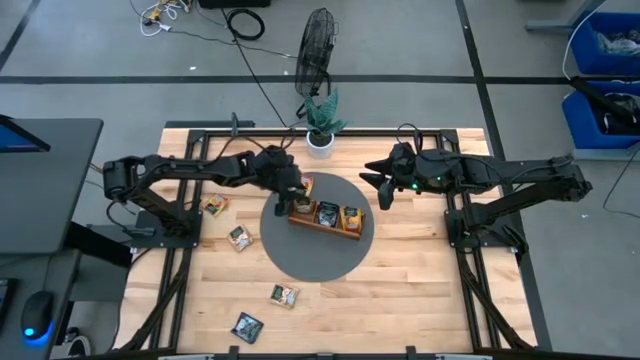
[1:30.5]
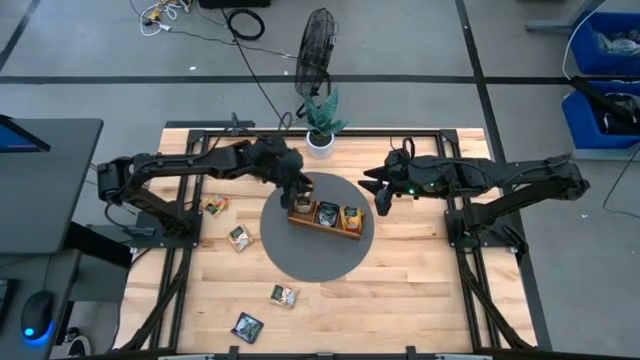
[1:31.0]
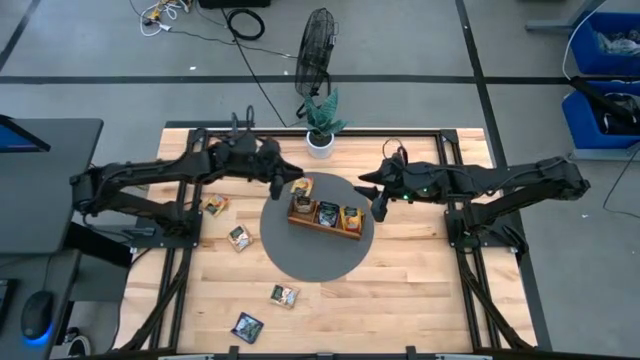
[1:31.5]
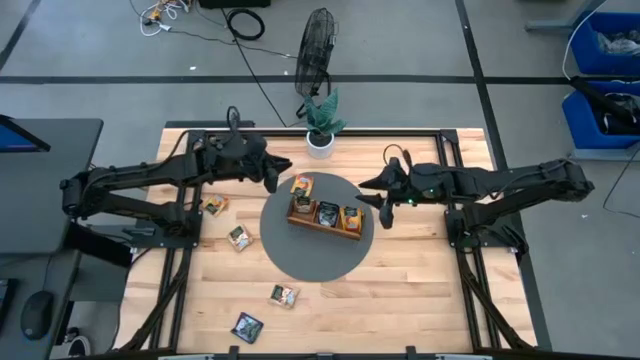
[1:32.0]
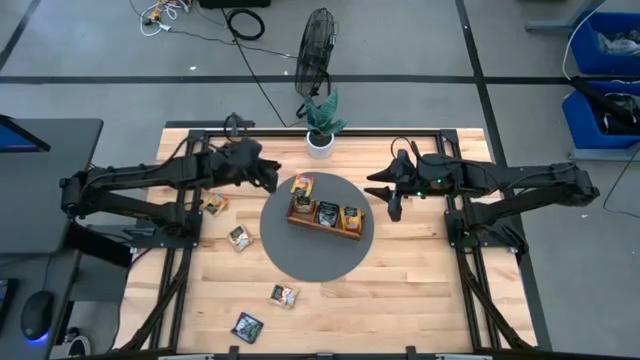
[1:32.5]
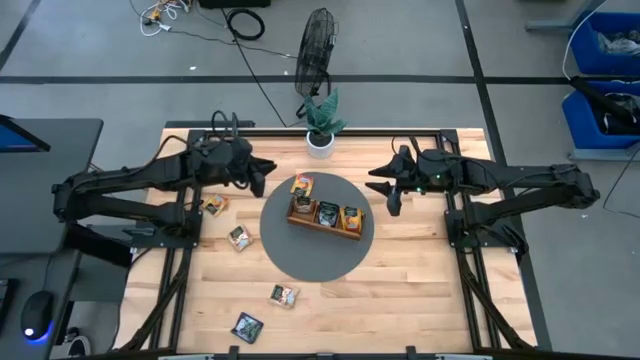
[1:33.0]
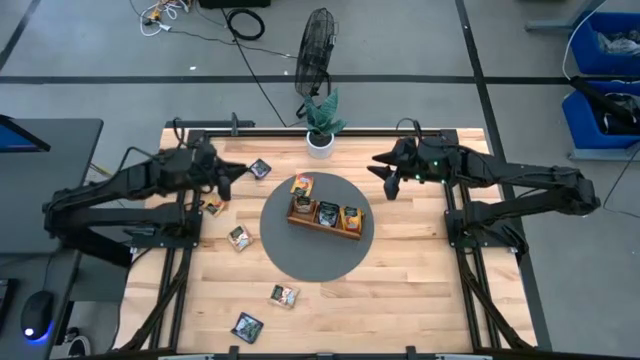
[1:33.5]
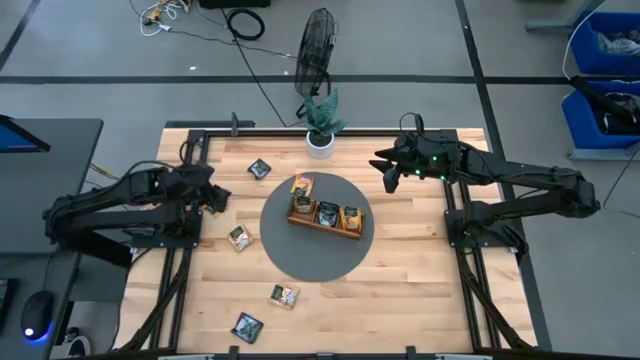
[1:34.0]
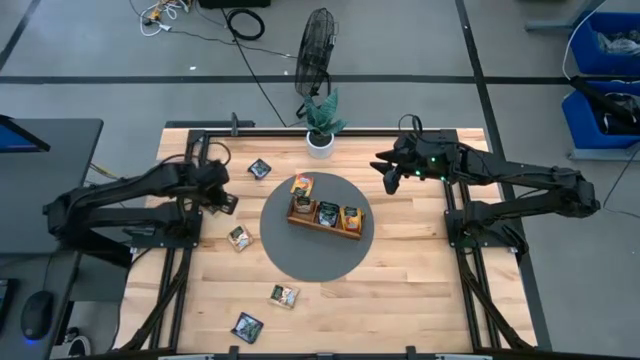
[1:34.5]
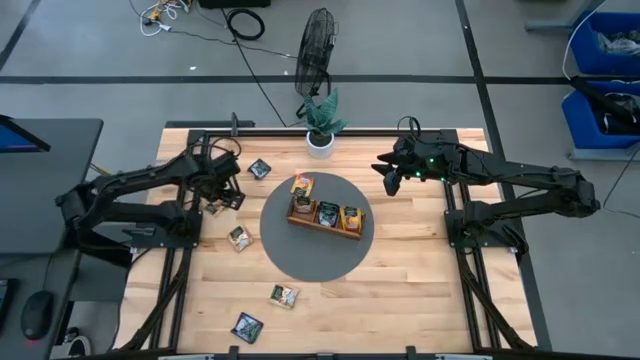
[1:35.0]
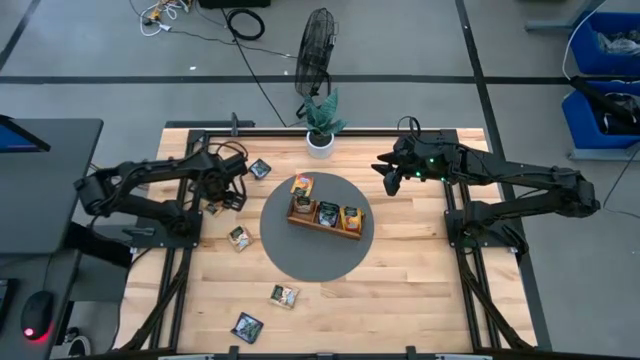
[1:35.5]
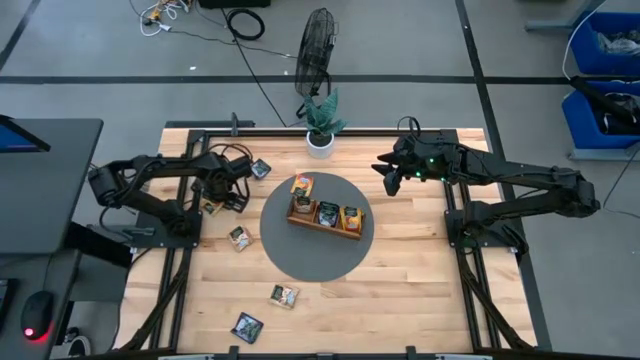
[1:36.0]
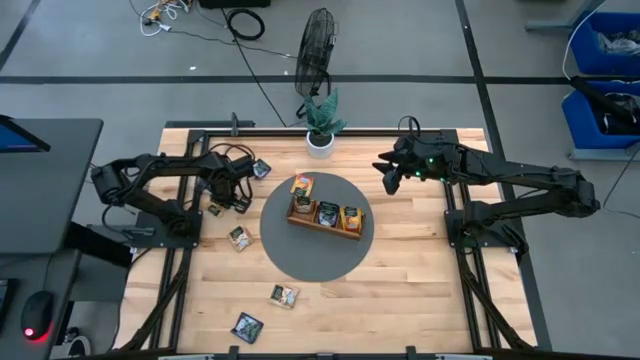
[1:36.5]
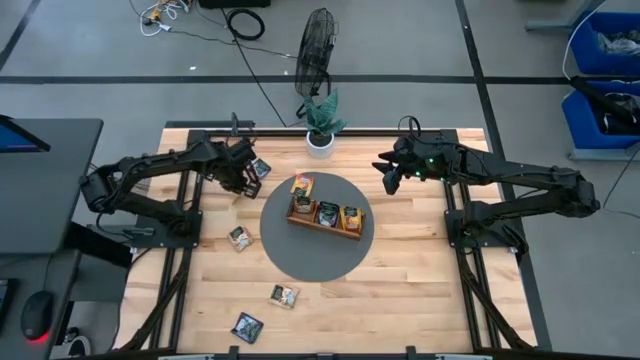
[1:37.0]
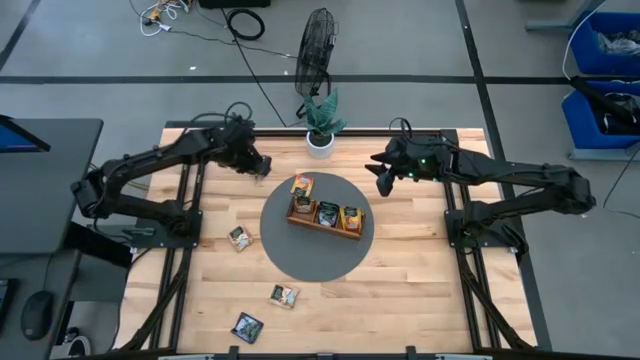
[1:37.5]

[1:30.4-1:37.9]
Task: Pick & Place Tea
Put the yellow tea bag into the right section of the wooden organizer

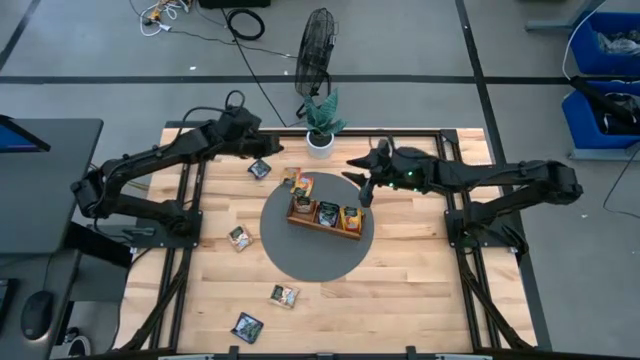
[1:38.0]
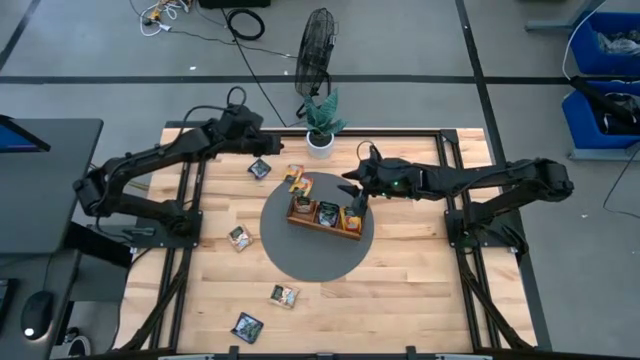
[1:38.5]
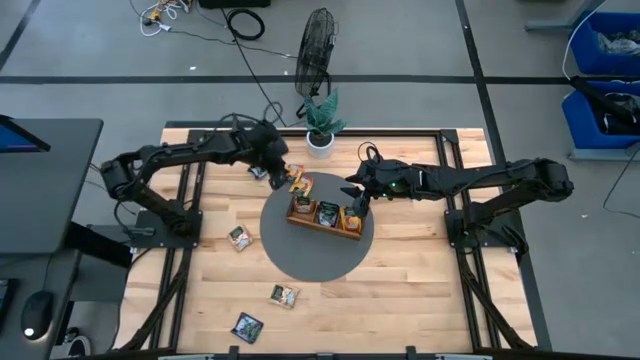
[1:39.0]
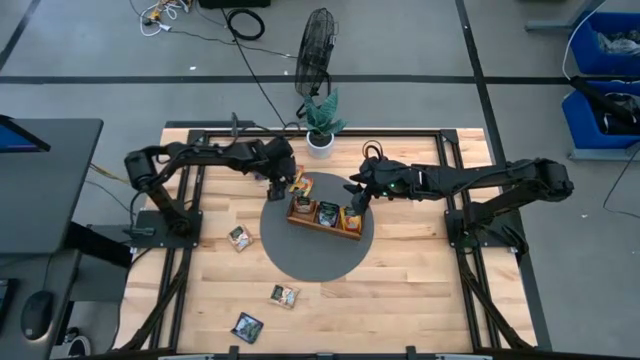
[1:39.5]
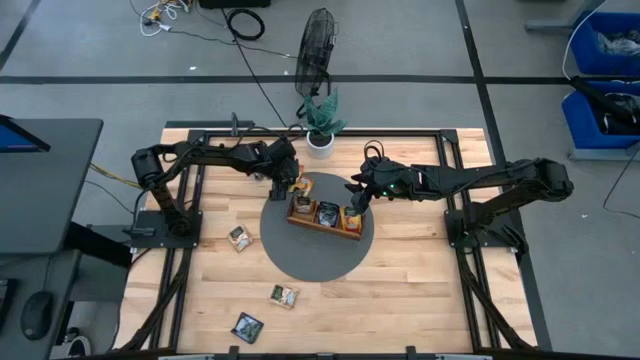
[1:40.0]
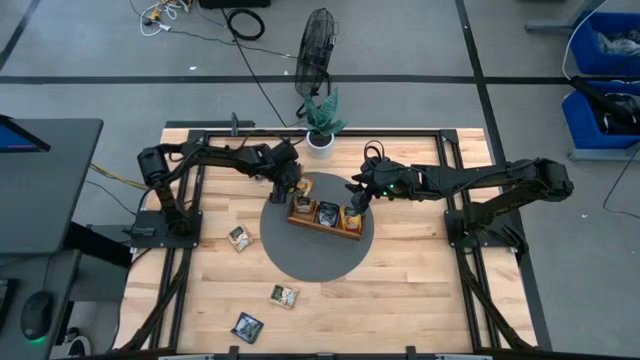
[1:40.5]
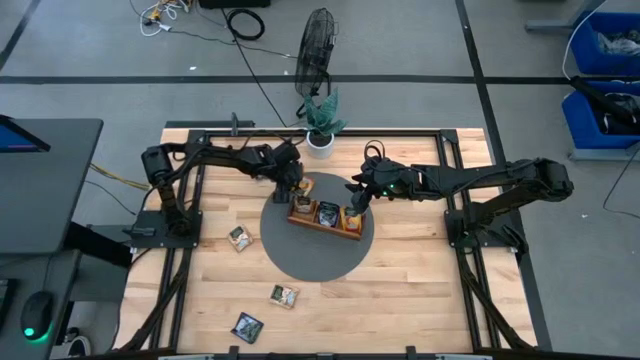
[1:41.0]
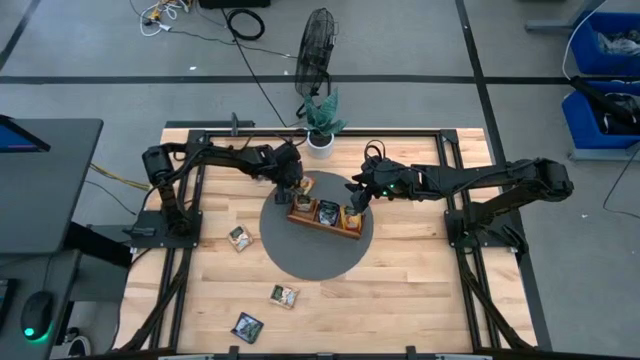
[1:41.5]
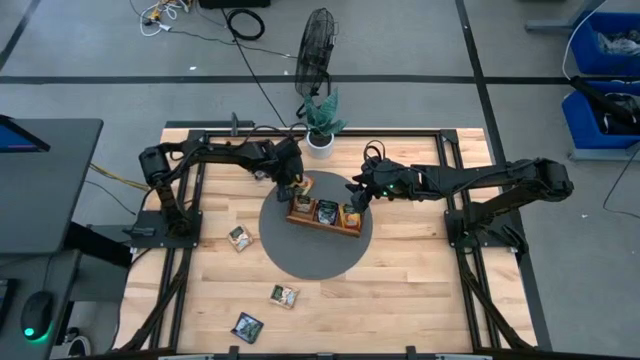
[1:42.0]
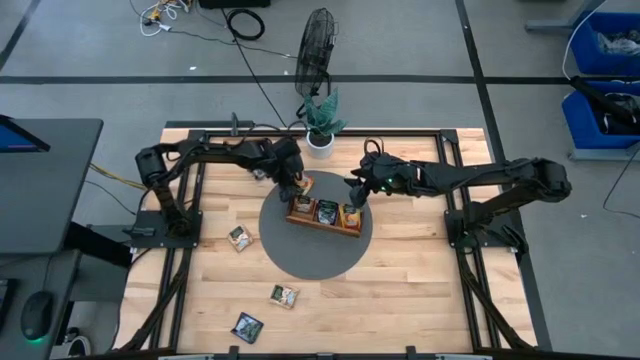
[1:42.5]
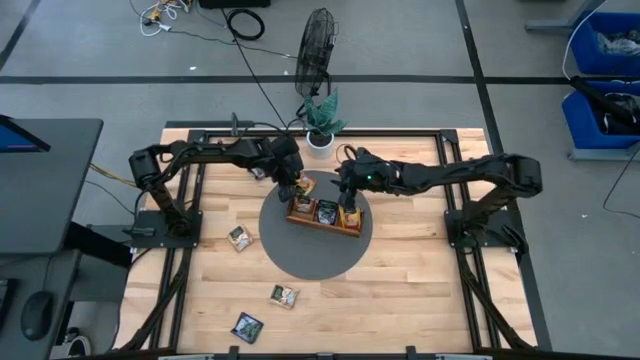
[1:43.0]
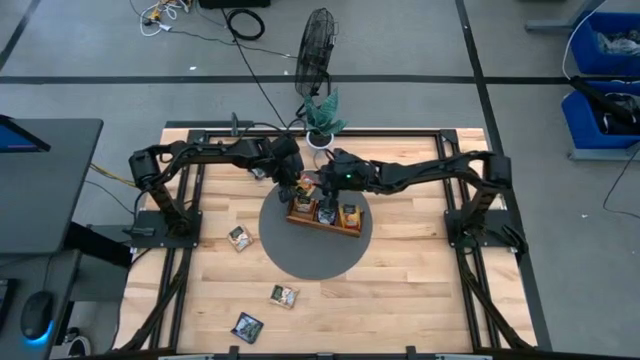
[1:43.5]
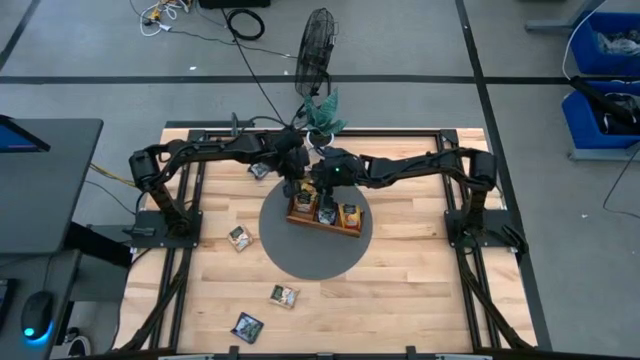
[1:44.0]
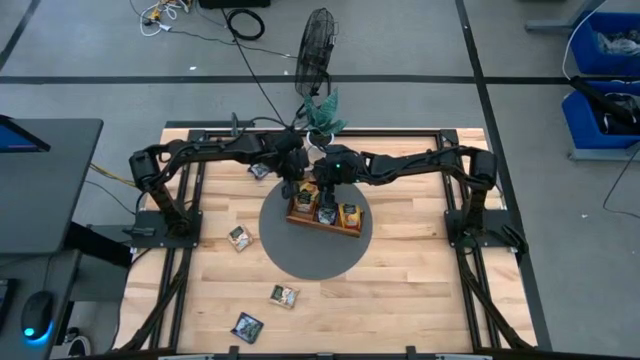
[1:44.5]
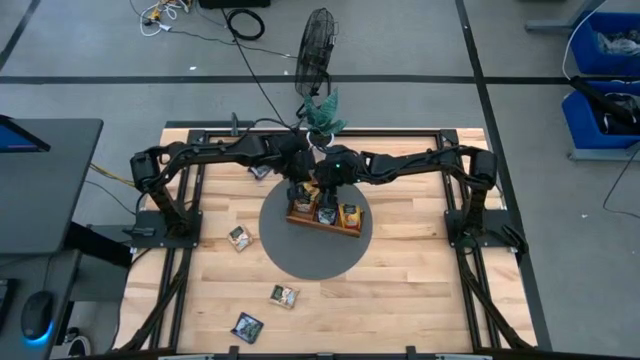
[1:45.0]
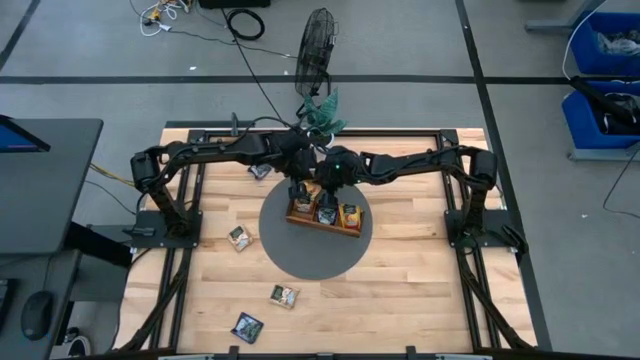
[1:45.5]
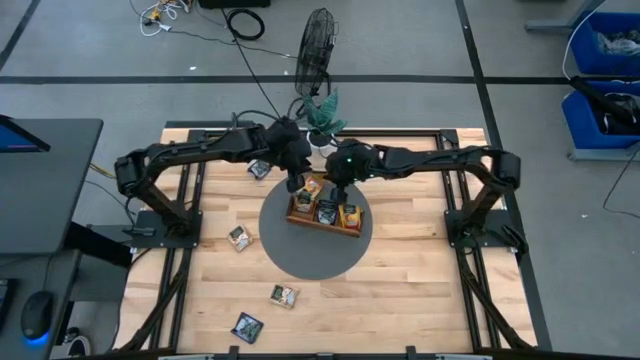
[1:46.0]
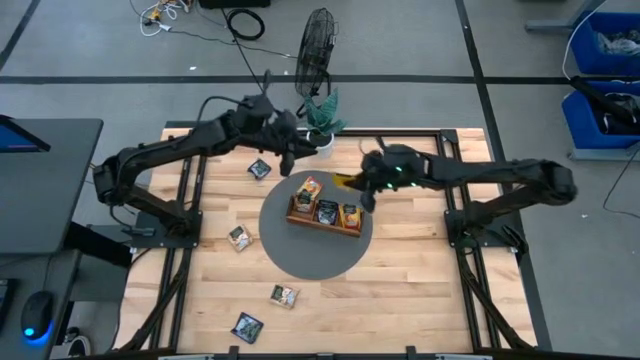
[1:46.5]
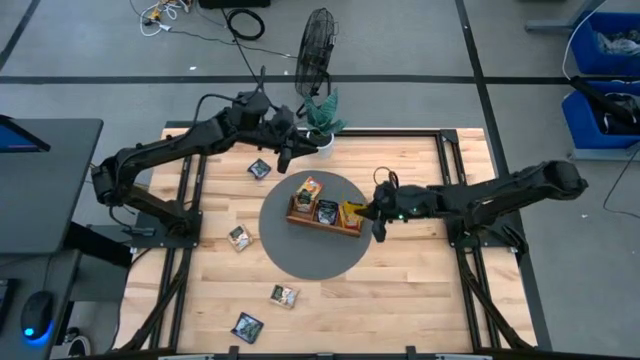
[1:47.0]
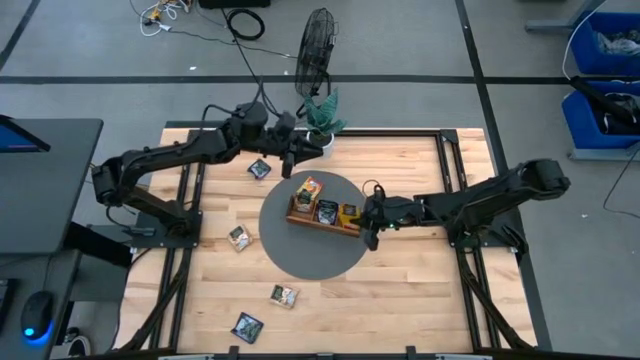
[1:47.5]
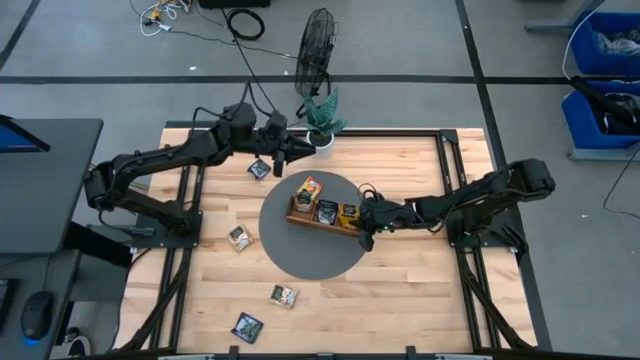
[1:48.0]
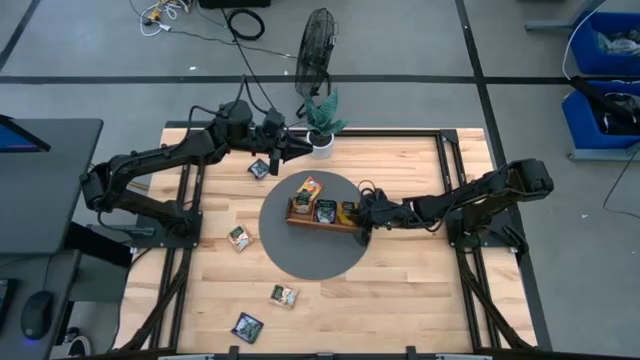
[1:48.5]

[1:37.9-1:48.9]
Put the yellow tea bag into the right section of the wooden organizer

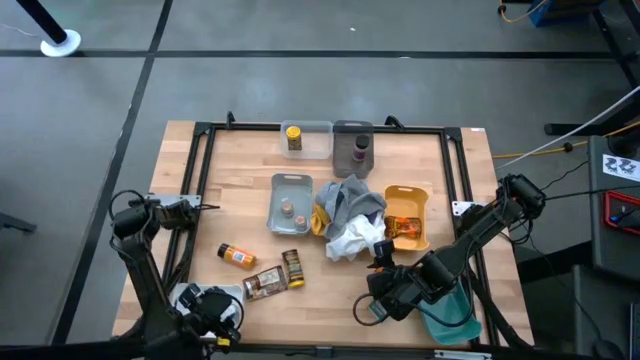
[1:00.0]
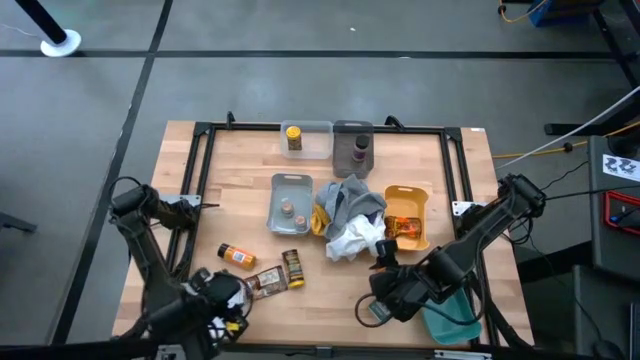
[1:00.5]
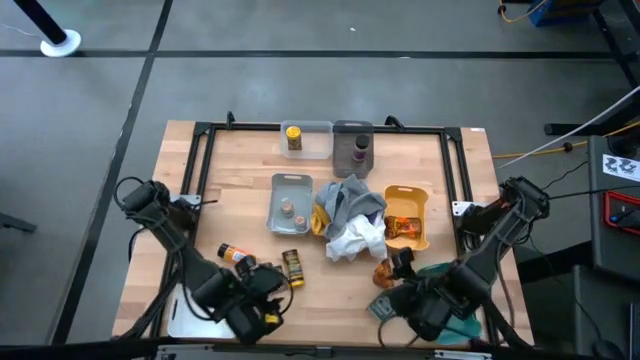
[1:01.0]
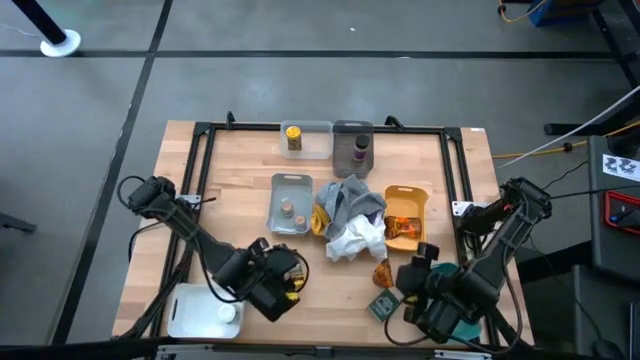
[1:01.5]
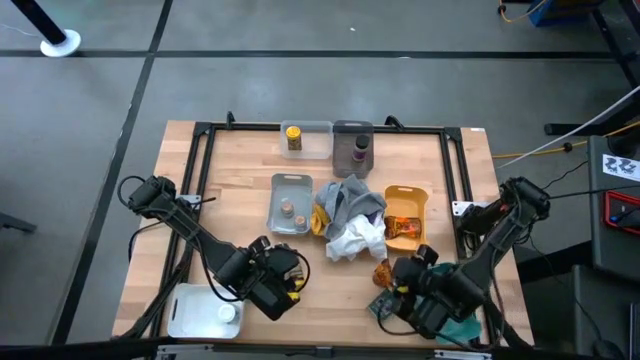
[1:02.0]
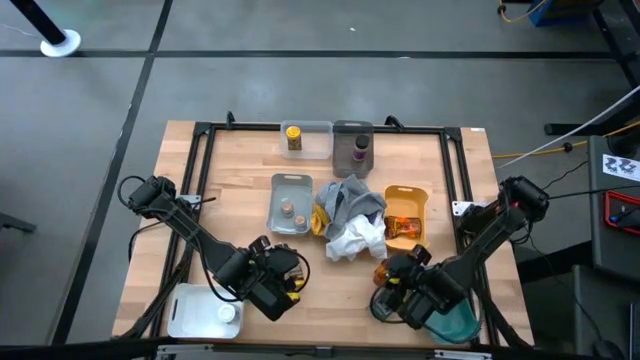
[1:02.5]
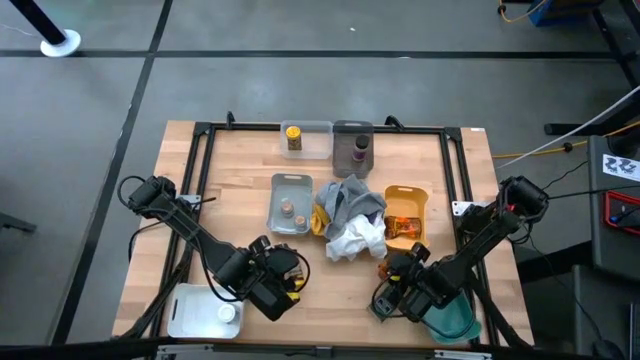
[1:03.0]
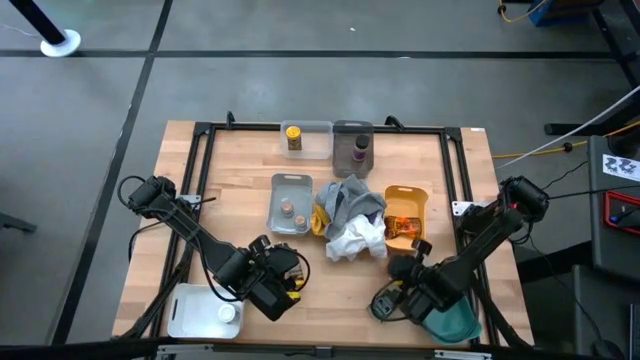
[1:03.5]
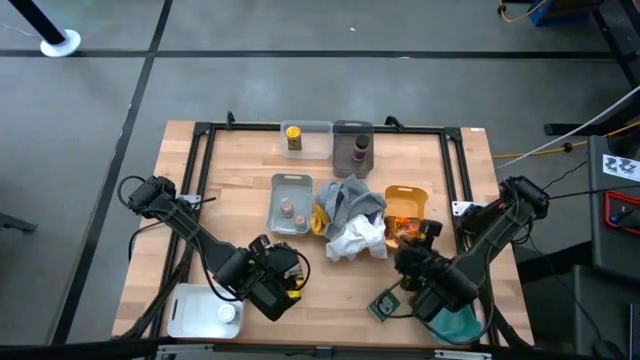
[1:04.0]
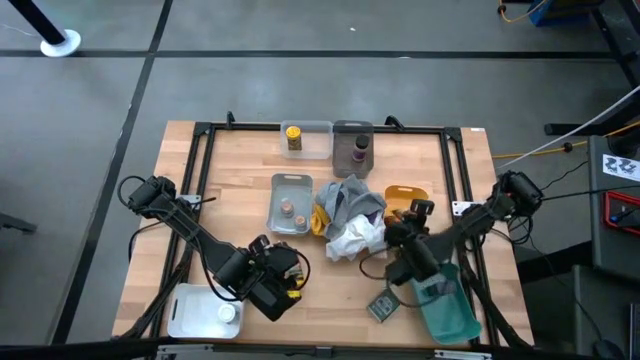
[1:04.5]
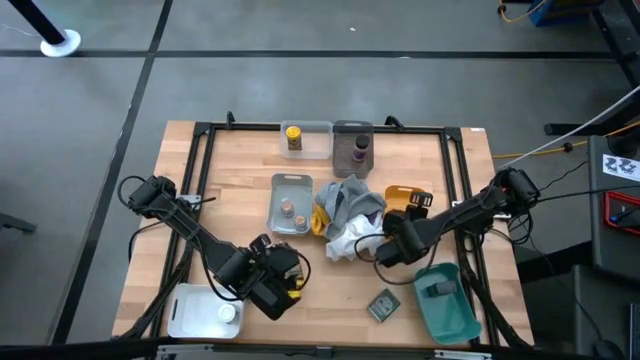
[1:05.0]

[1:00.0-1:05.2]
Task: Sort spices by type
Put the right orange seasoning pack into the yellow bin
